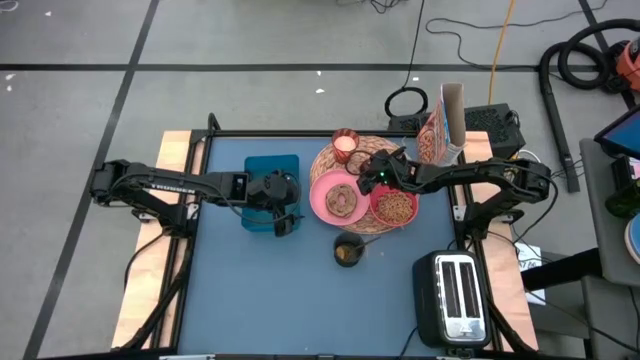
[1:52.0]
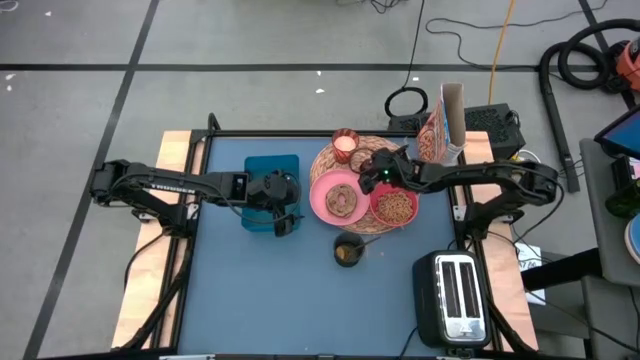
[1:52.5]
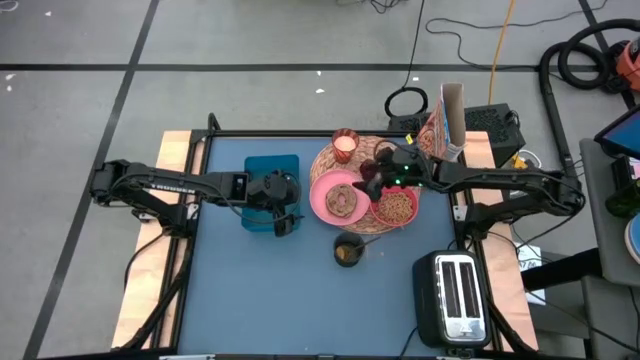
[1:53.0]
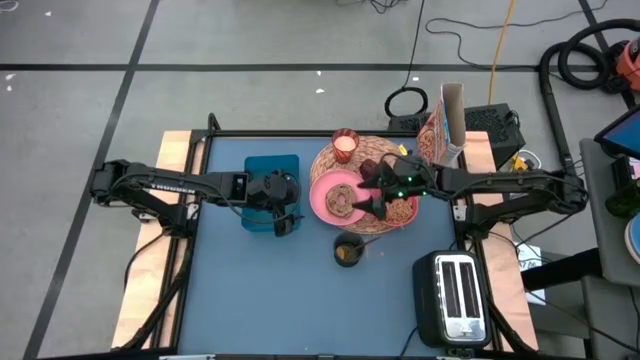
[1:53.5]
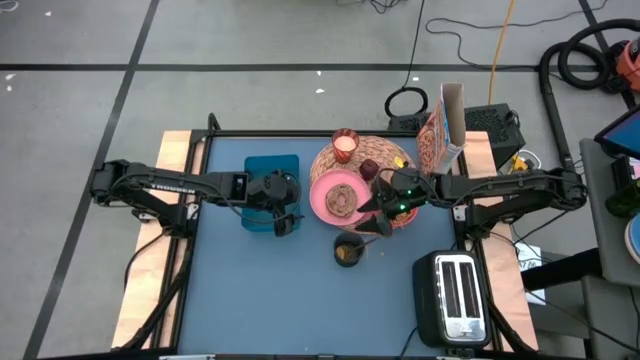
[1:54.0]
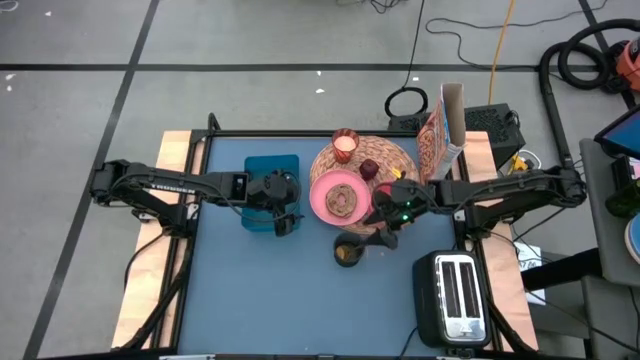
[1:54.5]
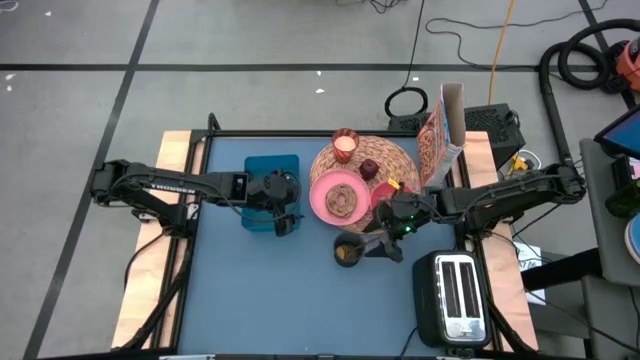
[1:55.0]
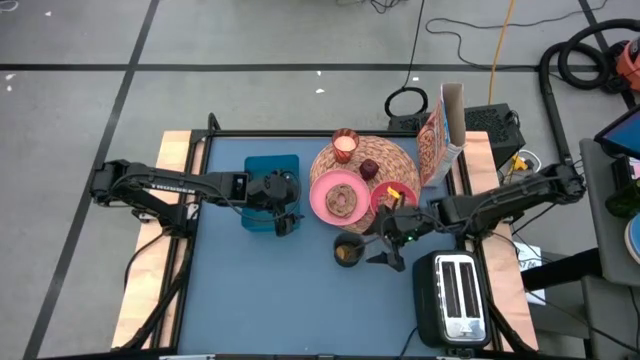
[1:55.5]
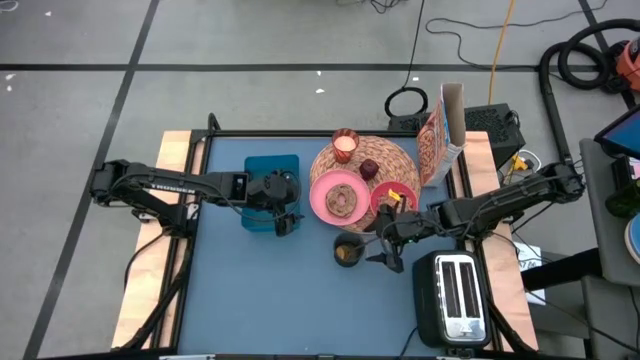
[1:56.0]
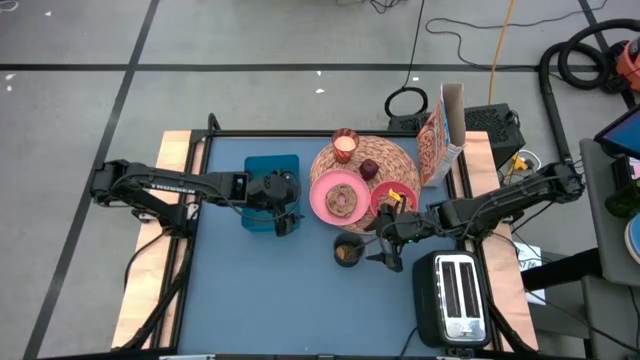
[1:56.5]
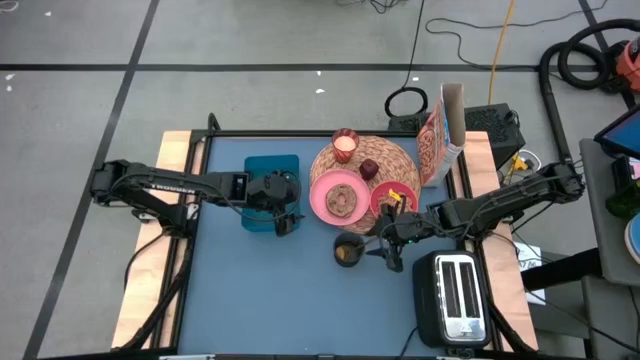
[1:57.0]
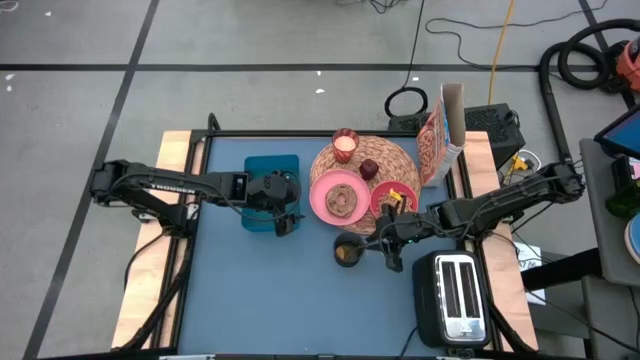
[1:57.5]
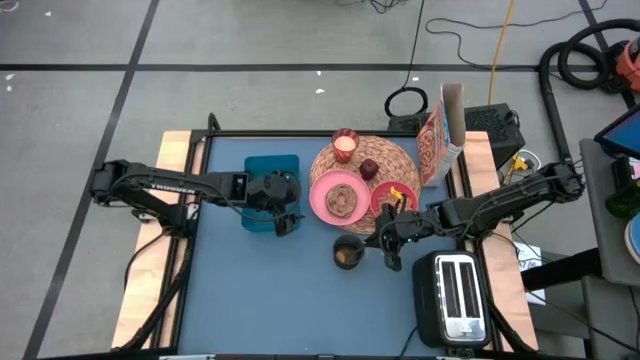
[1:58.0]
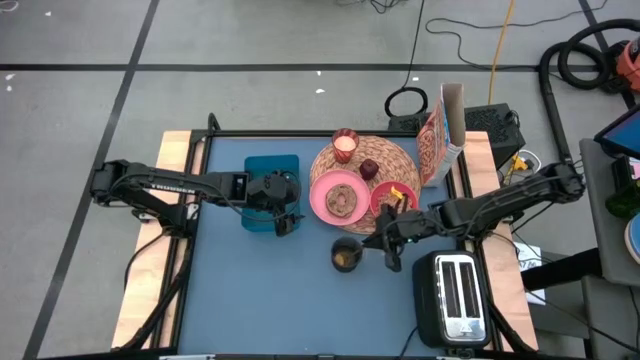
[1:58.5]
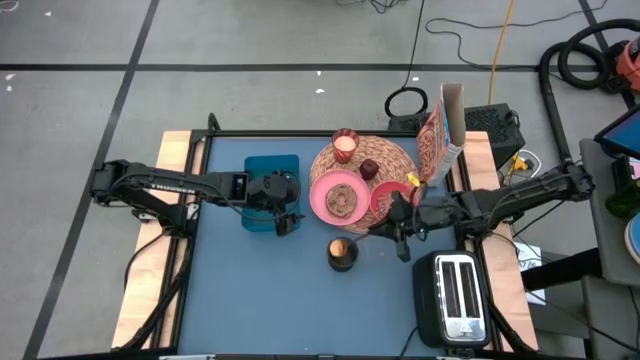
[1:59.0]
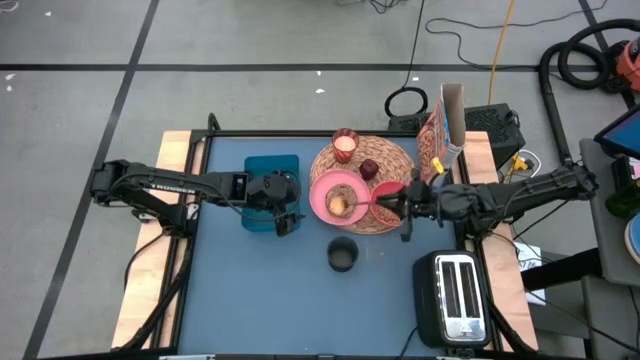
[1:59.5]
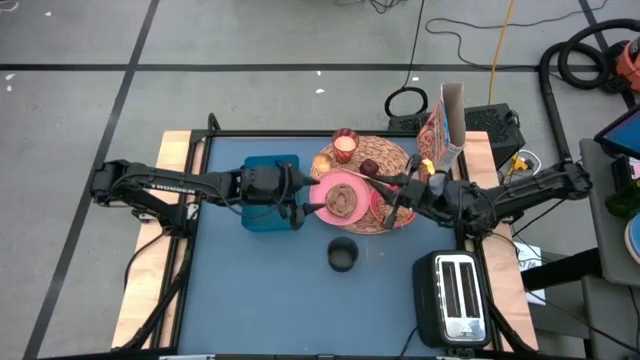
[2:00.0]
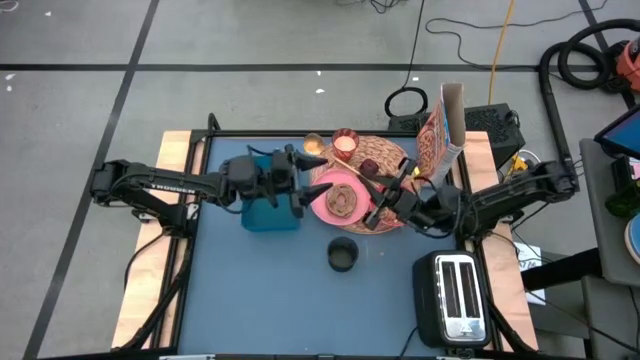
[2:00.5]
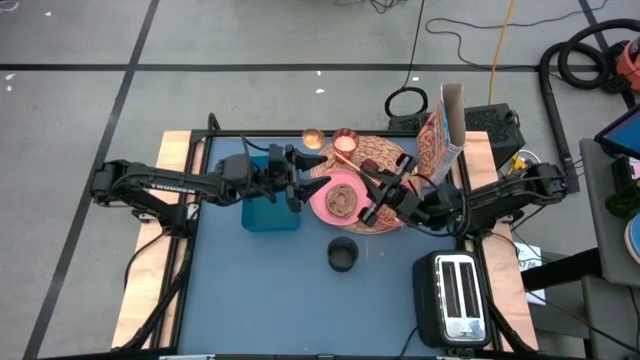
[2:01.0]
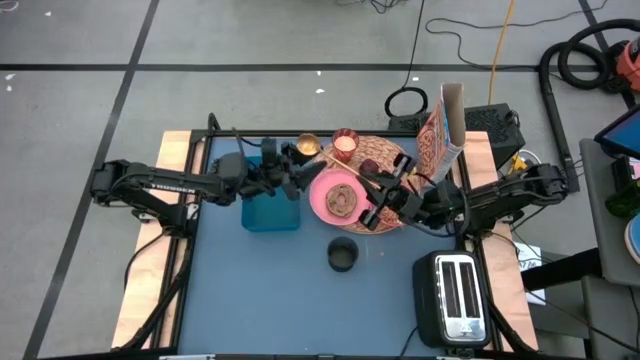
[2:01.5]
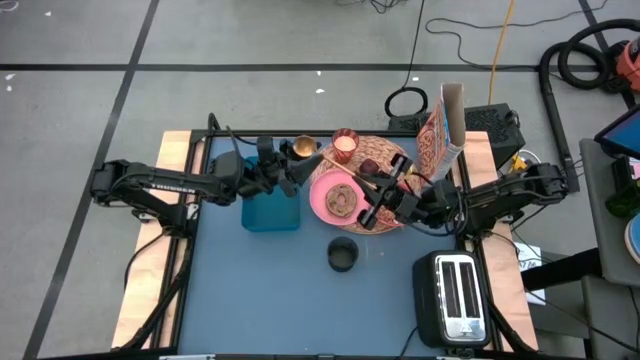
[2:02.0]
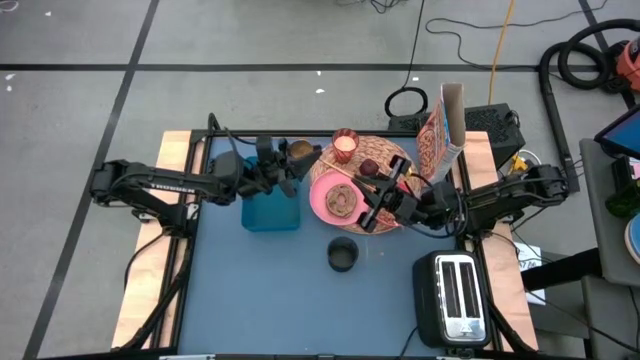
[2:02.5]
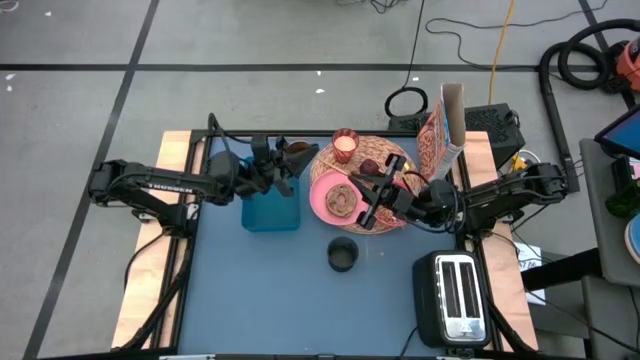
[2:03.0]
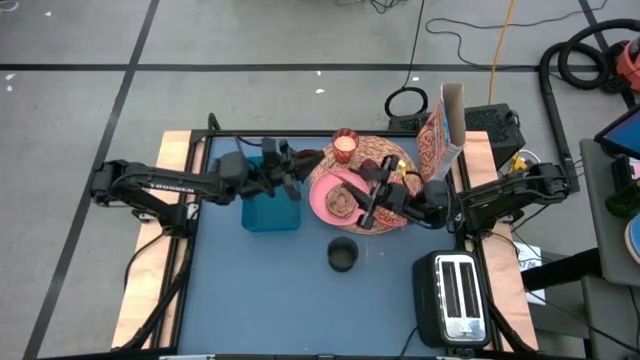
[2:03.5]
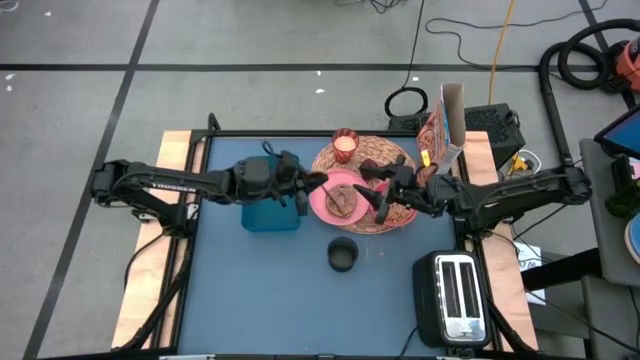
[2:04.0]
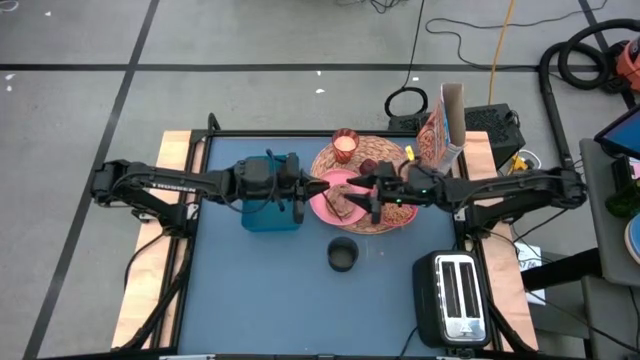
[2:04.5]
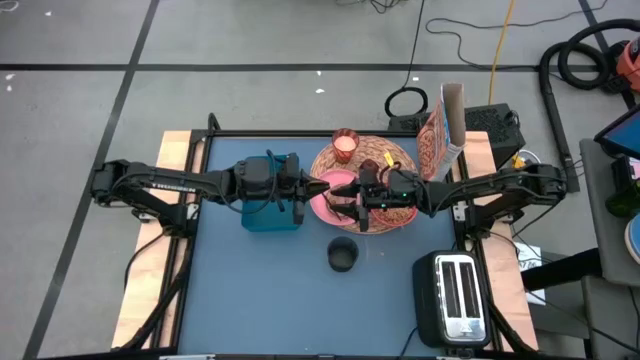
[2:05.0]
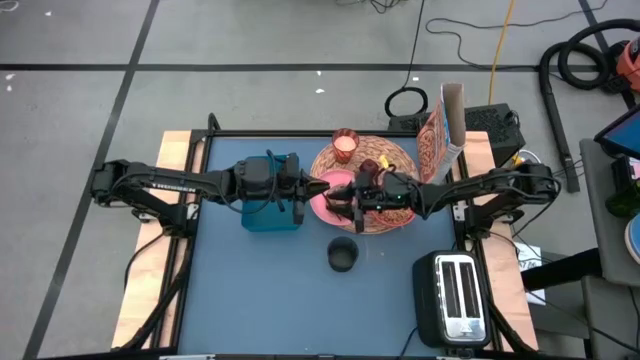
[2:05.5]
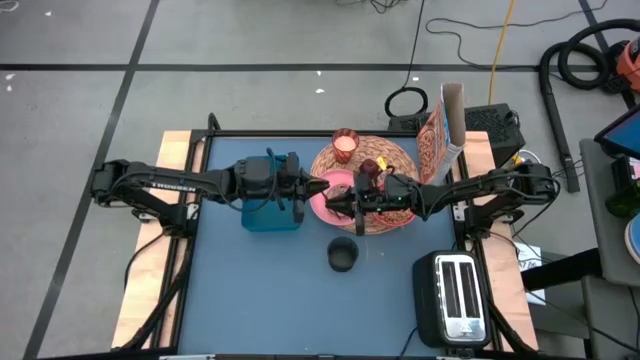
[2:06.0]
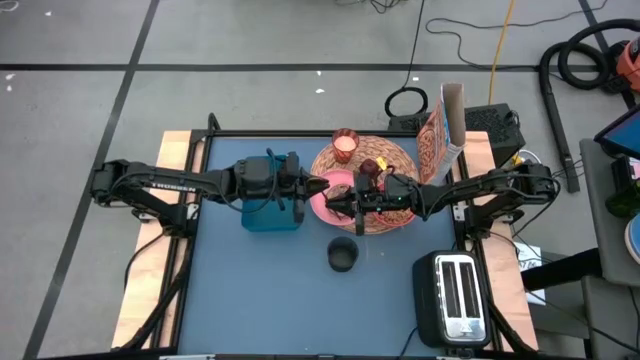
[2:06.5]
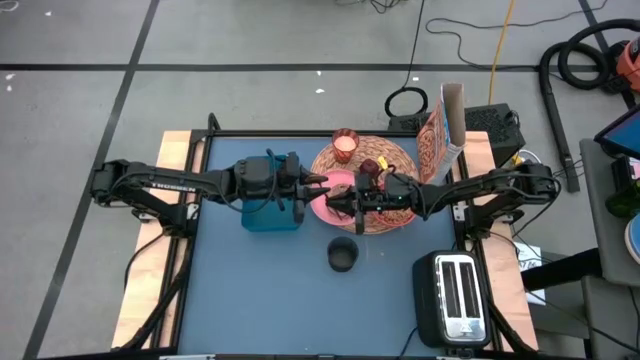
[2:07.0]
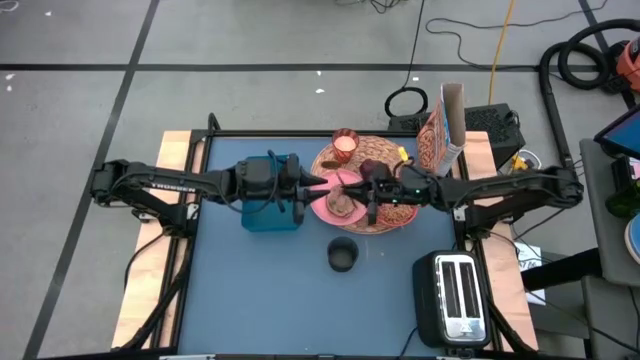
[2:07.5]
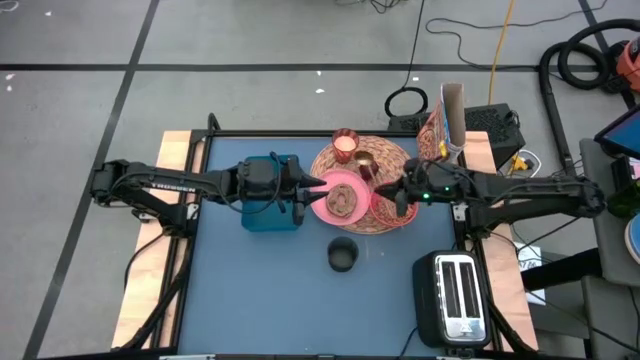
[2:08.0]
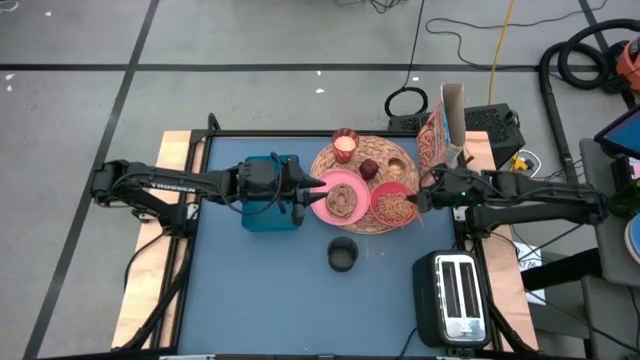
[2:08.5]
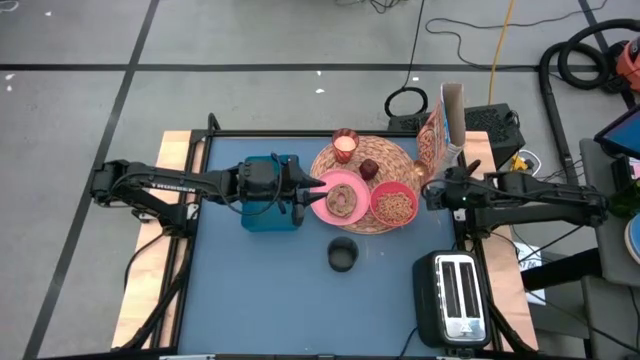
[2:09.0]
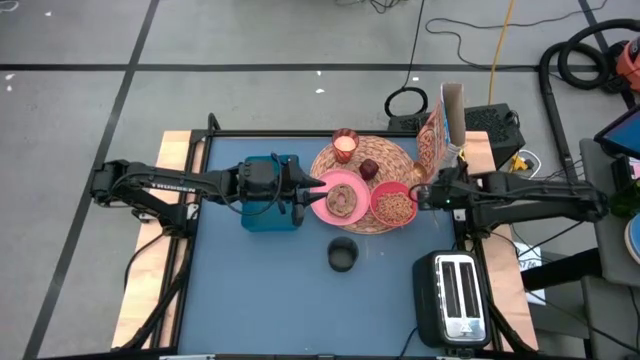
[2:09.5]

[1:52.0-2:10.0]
Task: Arrange a breakfast setting
Put the gold spoon to the right side of the pink bowl on the brown placemat

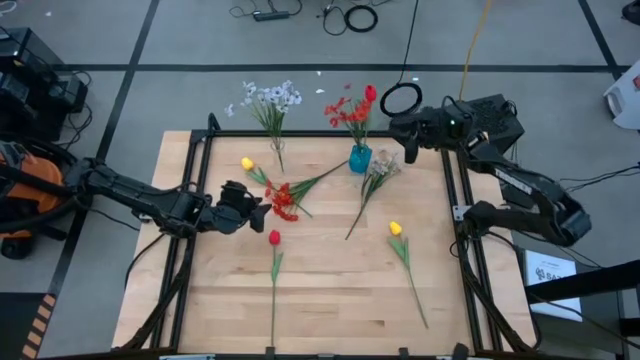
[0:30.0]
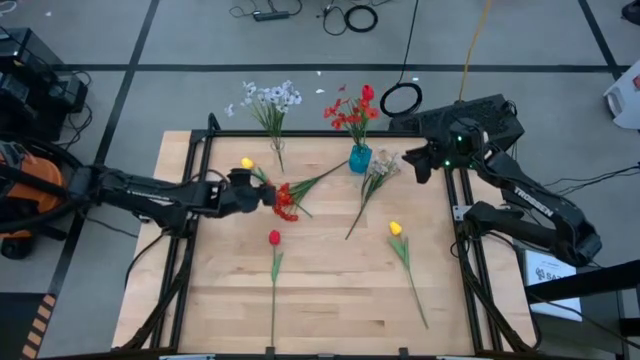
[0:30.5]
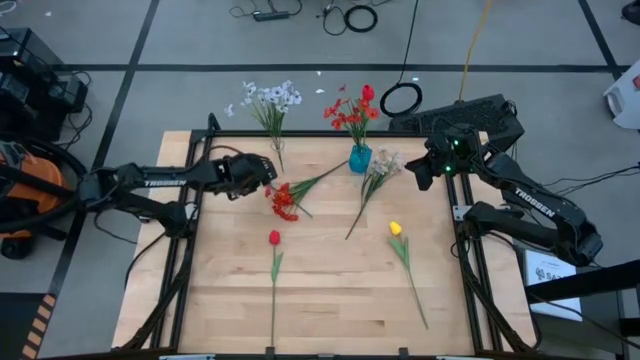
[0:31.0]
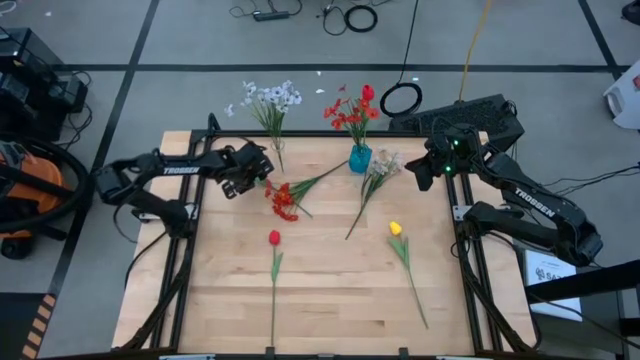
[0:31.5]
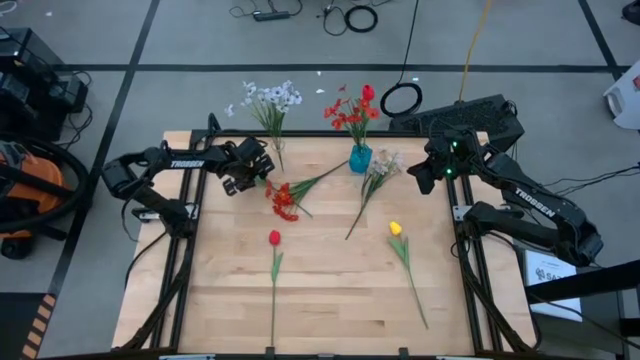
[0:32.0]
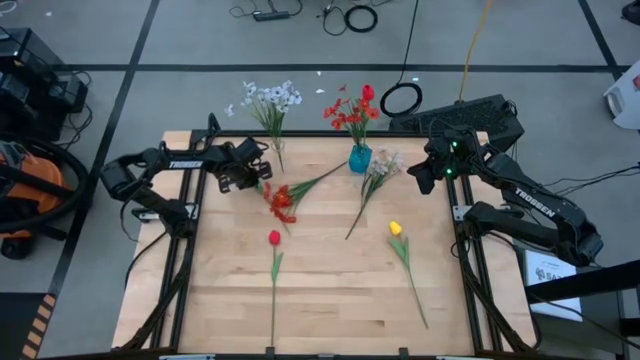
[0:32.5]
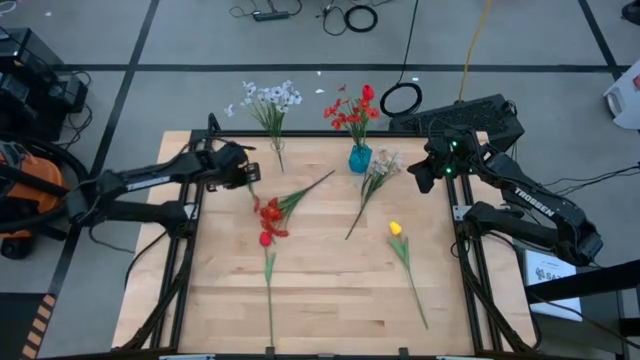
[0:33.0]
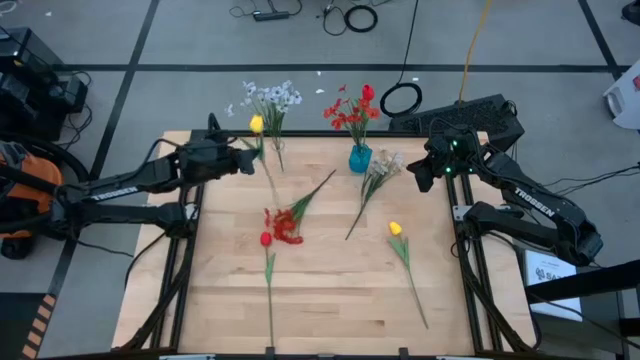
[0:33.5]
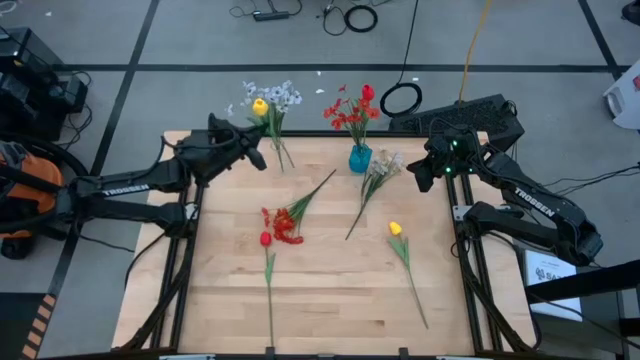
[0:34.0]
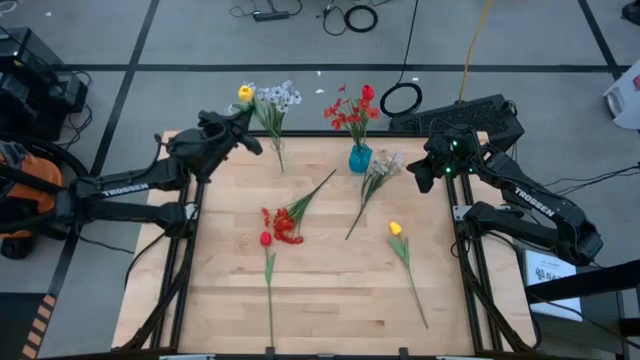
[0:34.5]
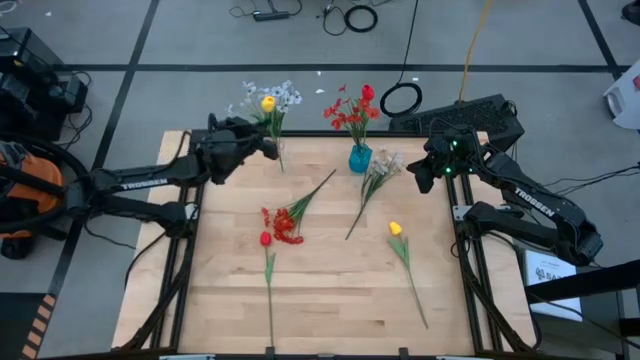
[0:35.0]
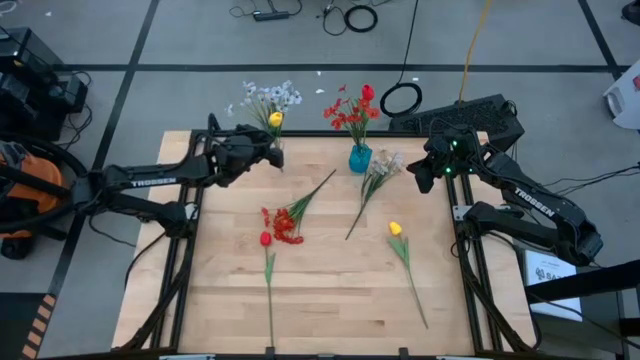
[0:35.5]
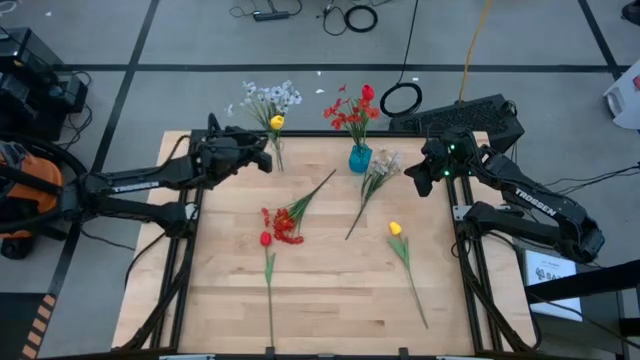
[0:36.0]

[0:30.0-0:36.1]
Task: Sort flowers into vase by color
Put the top yellow flower into the transparent vase
